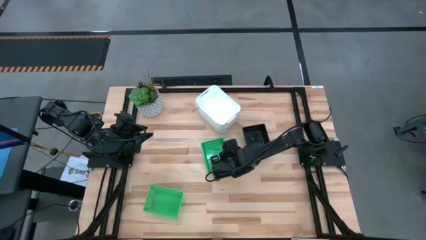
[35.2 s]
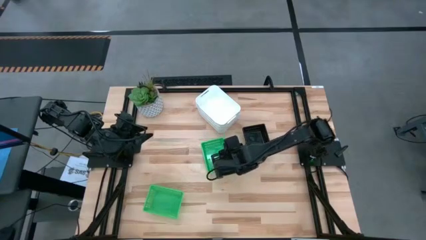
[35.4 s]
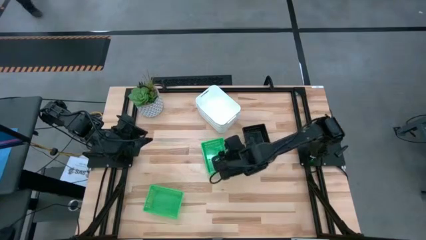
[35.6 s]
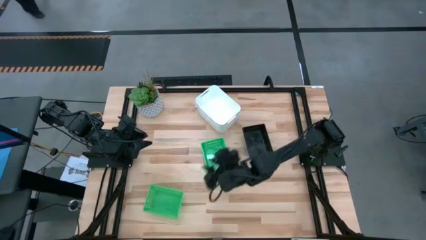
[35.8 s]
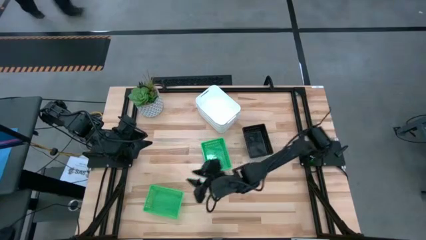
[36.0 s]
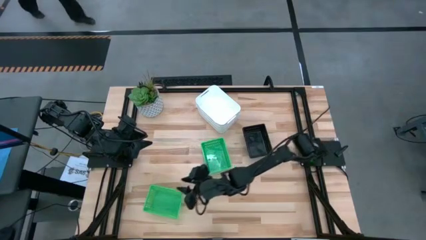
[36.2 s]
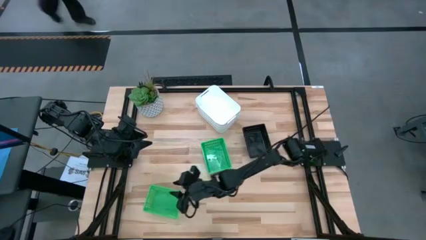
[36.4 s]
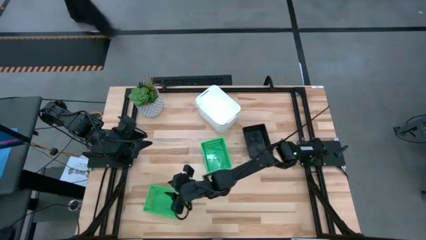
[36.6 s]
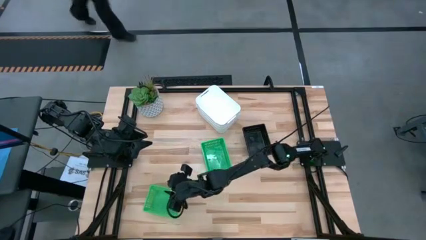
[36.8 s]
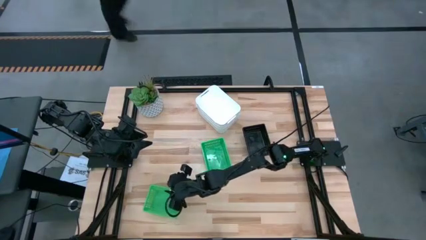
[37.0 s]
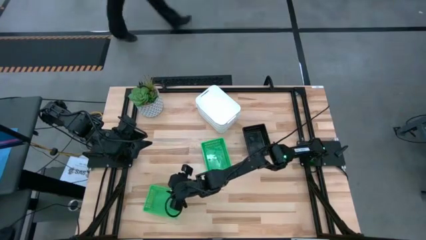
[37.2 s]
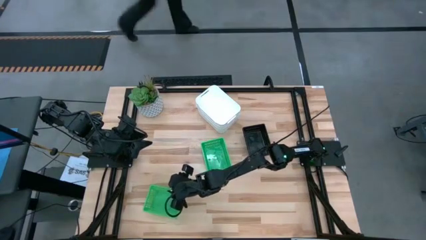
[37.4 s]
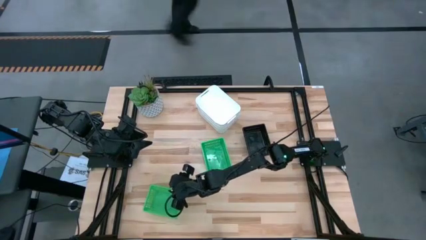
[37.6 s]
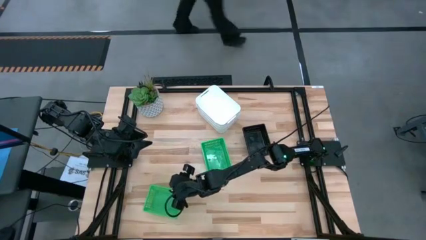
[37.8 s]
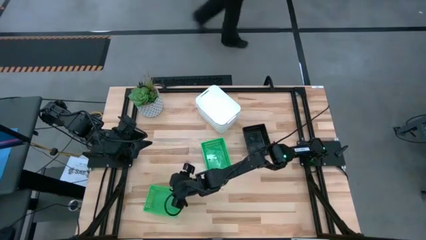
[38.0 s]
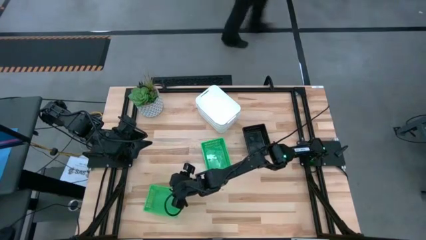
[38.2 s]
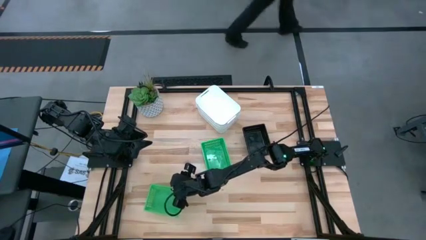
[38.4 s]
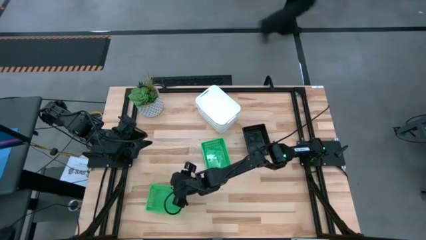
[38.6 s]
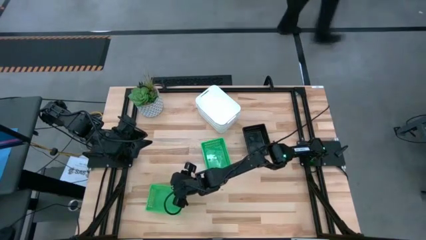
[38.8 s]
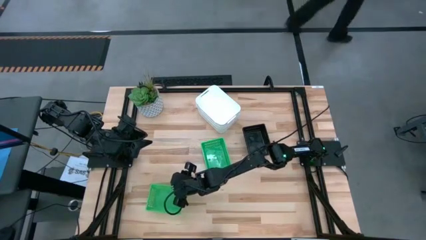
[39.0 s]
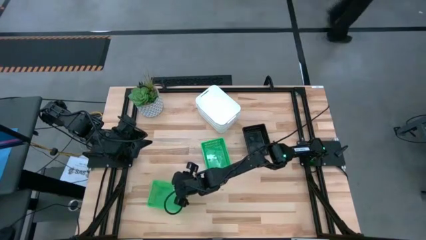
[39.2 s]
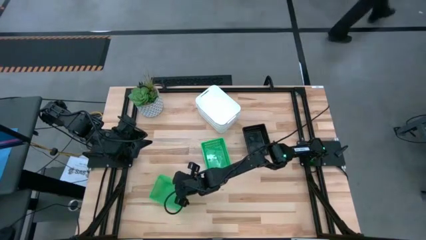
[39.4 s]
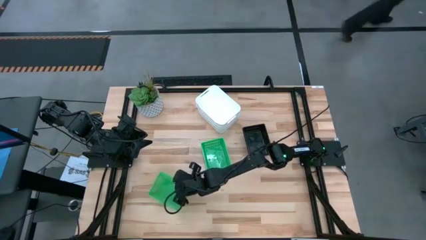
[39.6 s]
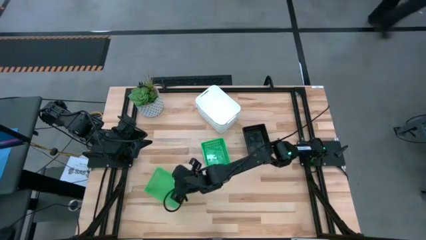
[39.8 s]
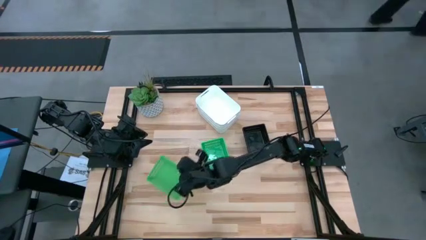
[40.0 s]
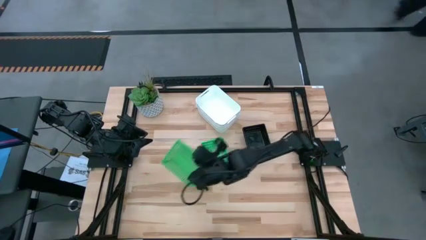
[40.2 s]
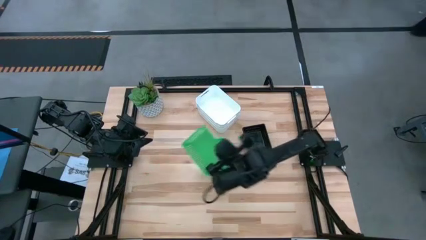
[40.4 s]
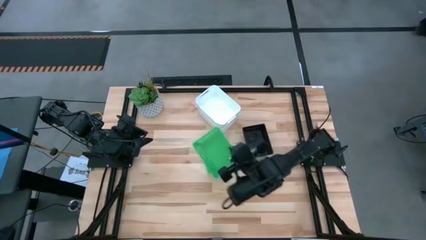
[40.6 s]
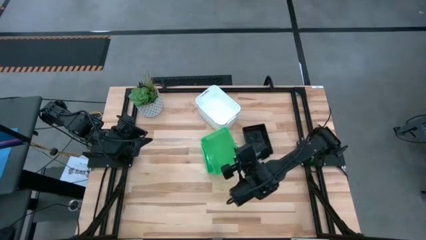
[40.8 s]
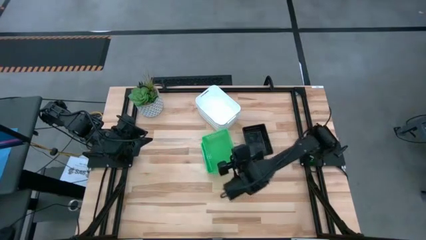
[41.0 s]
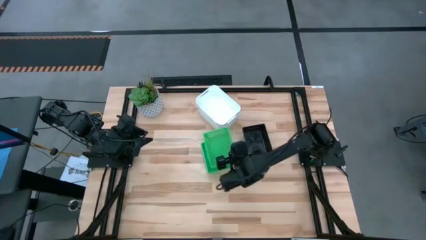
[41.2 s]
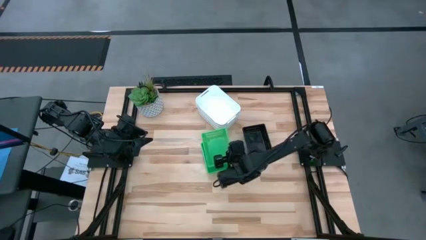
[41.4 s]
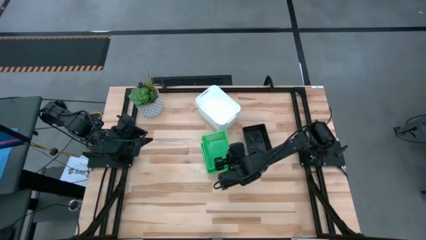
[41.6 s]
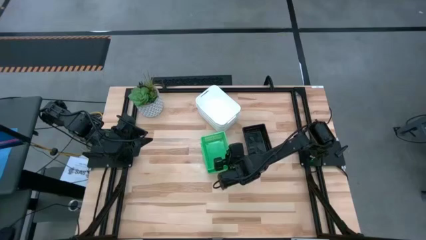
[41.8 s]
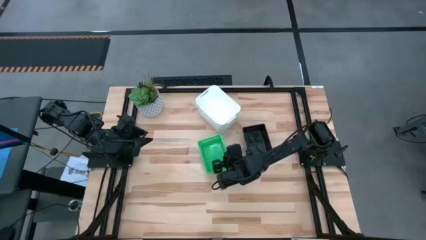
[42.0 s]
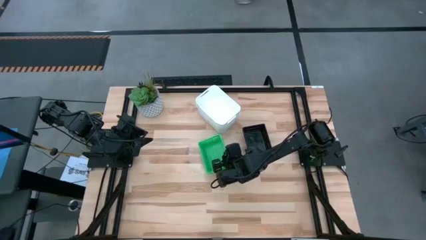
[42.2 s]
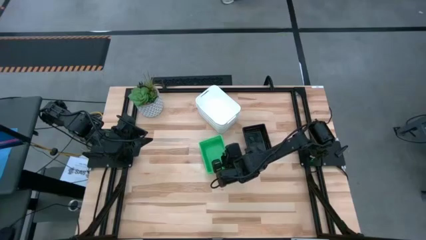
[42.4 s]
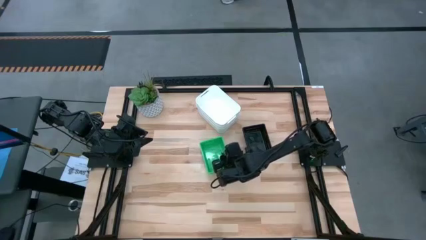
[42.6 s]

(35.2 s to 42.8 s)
Stack the bottom green bin on the green bin

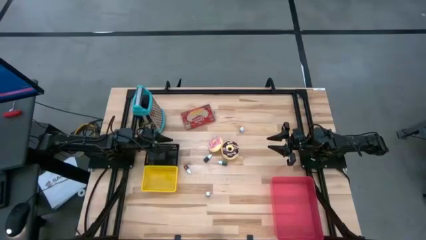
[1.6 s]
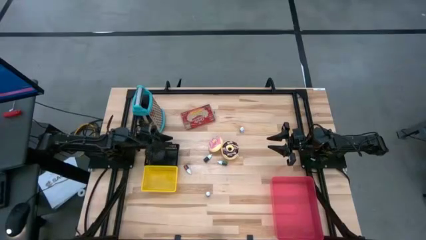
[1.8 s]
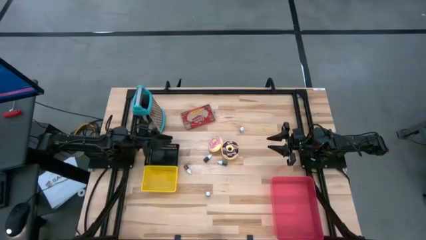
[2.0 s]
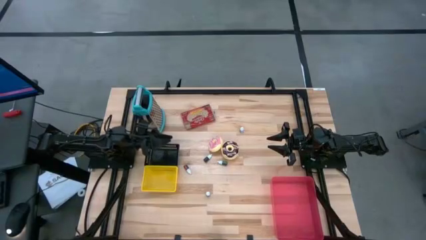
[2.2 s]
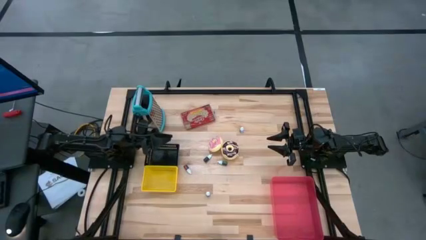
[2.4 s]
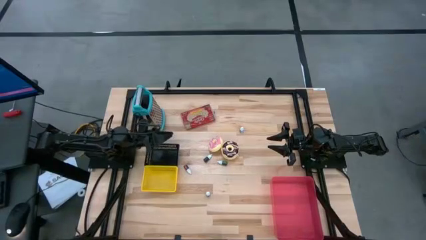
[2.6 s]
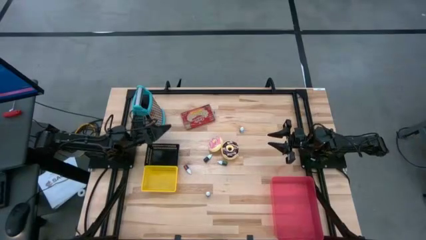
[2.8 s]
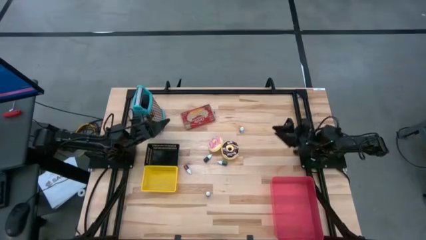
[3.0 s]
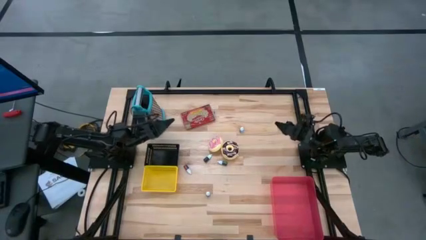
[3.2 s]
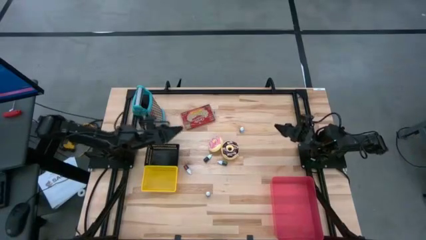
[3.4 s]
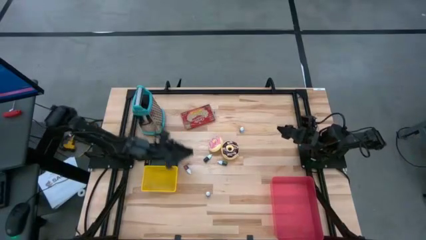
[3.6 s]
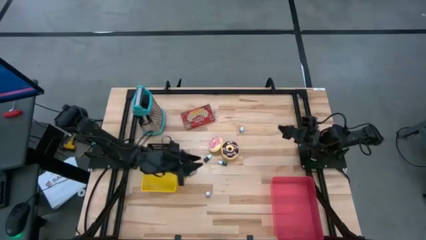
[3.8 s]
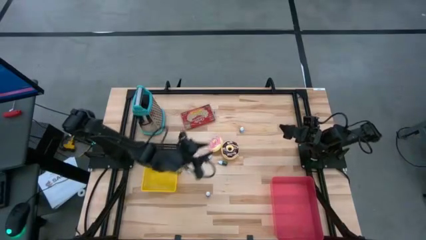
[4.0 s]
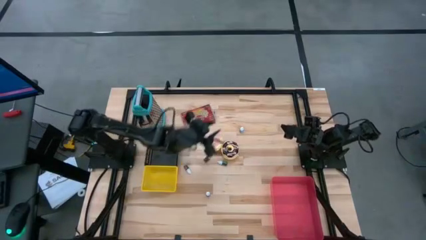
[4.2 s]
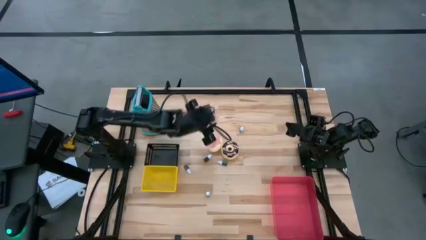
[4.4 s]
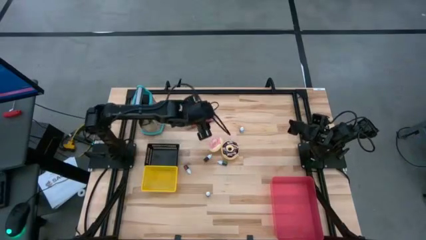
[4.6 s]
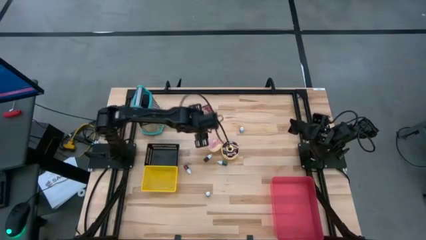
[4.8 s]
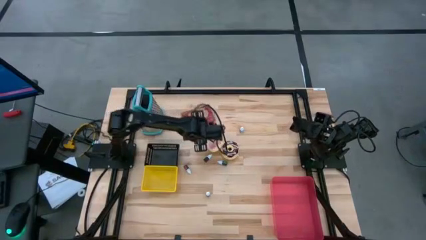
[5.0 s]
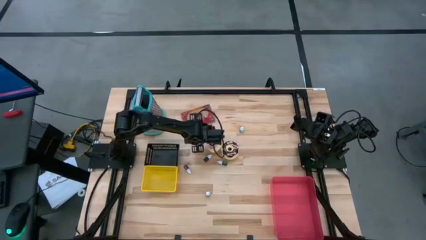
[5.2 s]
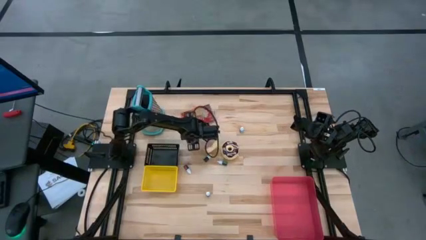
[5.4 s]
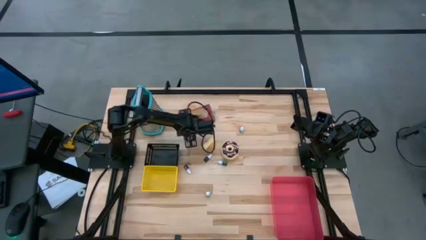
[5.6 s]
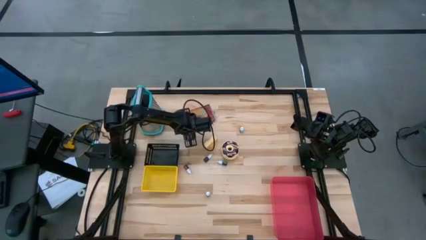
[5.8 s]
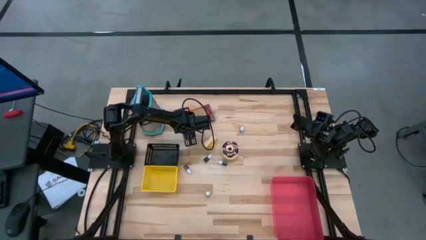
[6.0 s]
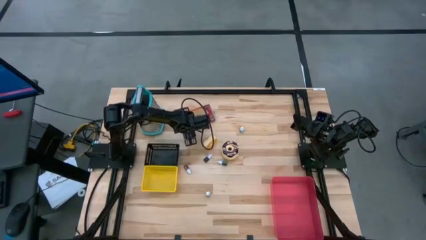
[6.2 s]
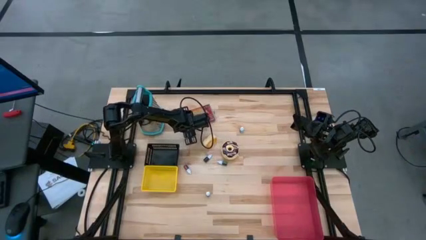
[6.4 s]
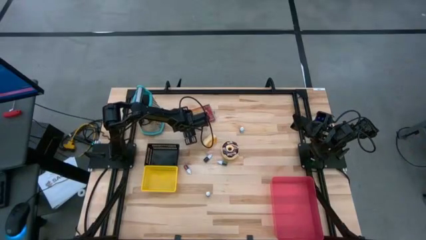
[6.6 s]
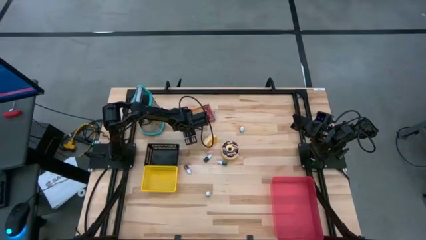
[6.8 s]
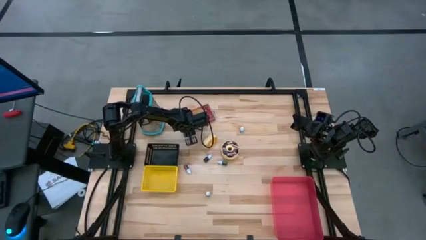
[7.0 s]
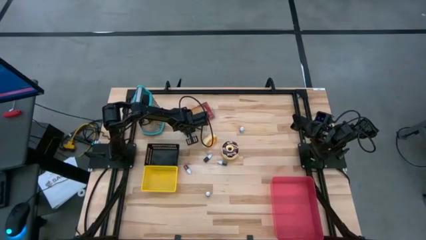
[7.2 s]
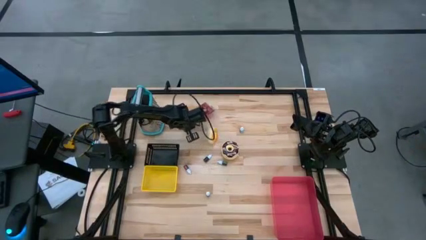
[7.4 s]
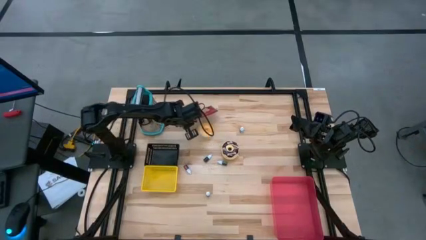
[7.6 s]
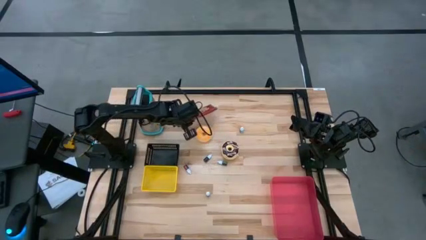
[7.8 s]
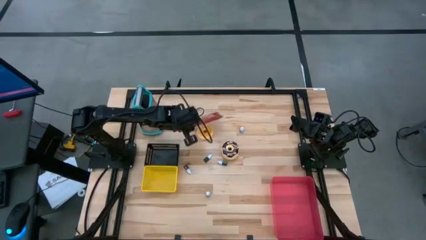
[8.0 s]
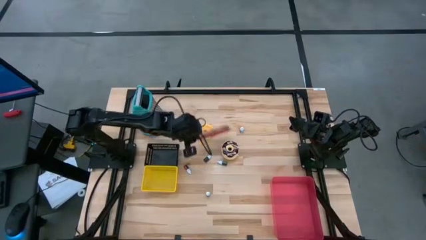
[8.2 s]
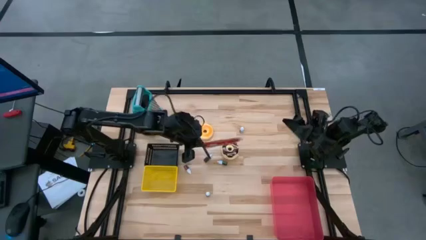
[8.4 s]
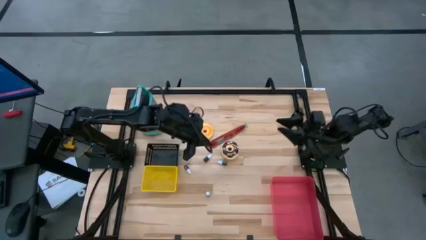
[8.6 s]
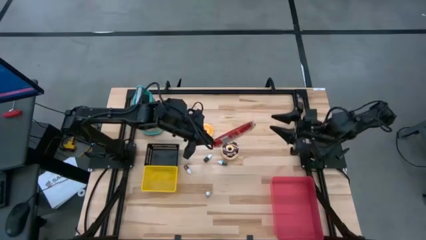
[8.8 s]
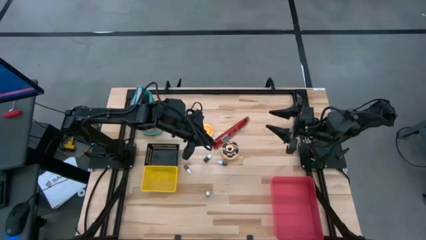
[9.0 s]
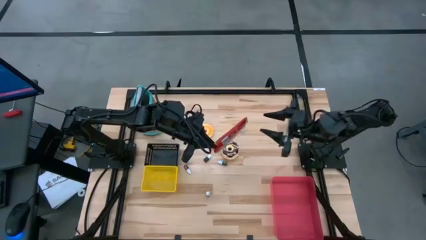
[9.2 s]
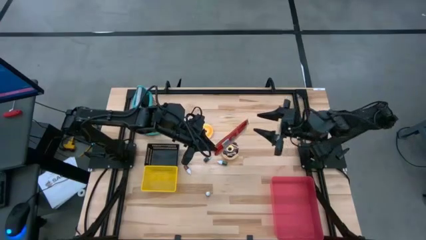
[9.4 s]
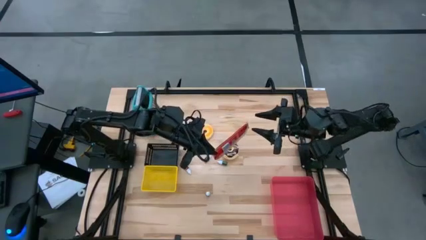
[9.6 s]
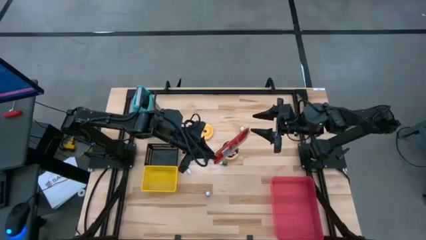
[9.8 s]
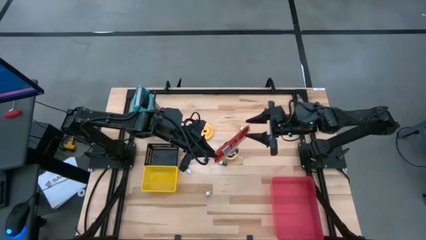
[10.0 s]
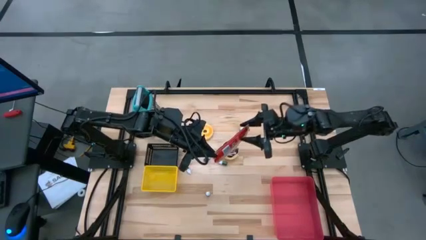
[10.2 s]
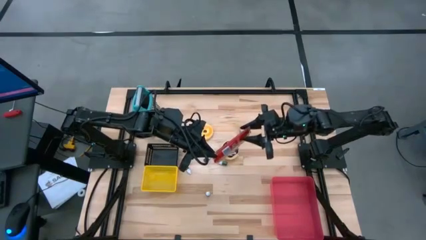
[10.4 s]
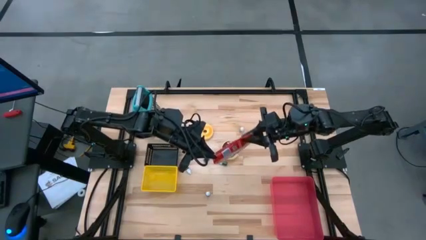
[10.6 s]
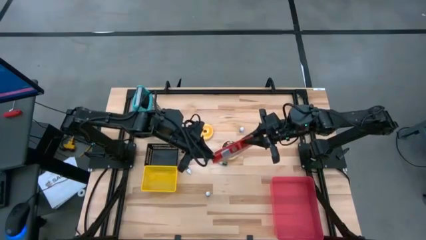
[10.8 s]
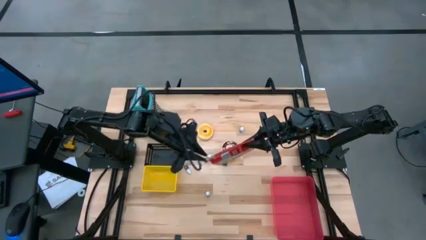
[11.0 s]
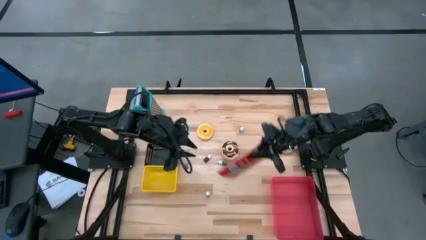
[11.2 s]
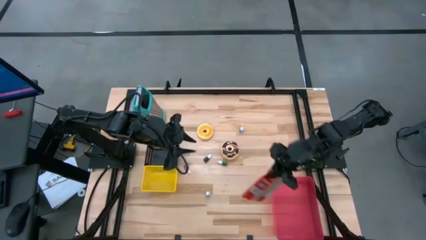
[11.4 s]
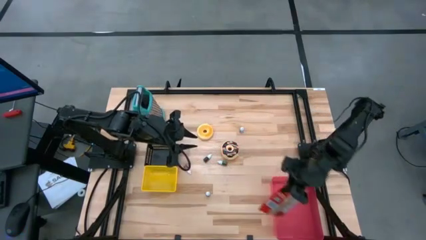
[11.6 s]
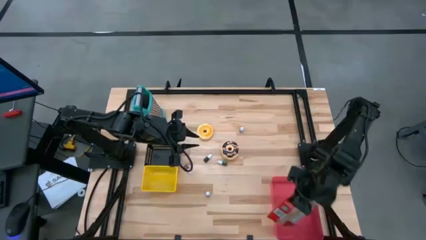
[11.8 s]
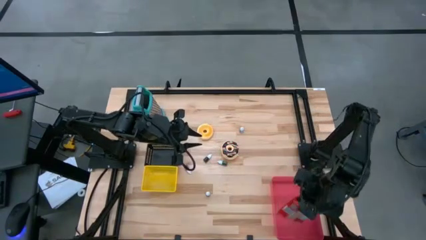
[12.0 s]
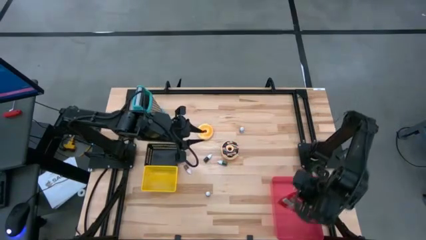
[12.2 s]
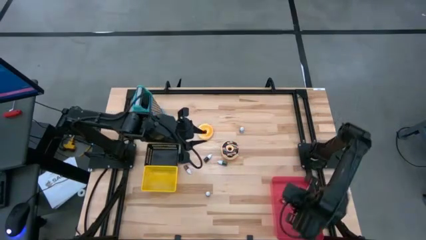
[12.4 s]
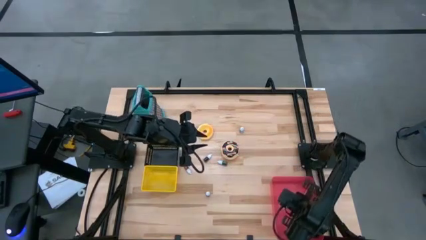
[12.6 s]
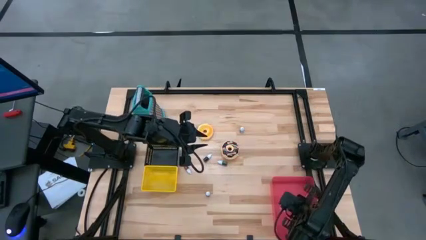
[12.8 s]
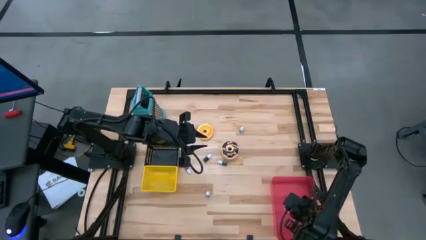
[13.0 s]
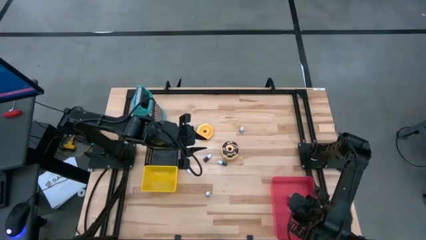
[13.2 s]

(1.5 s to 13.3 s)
Put the red popcorn bag into the pink bin
